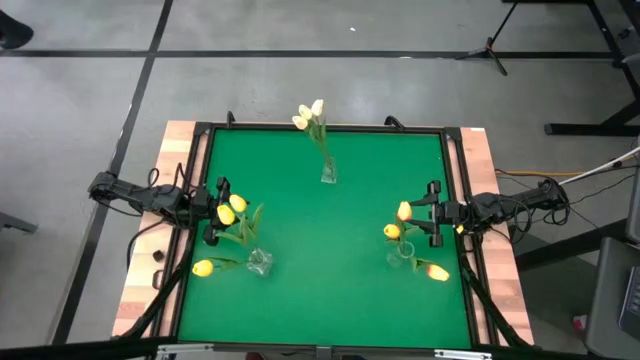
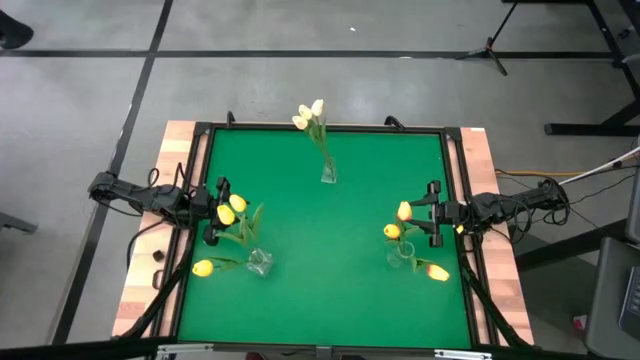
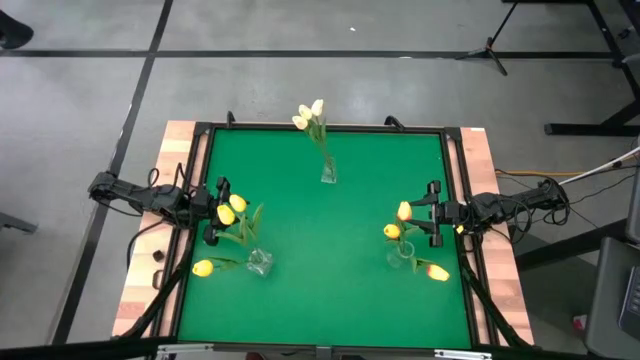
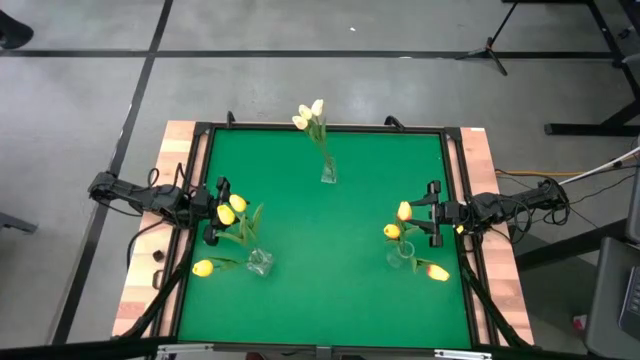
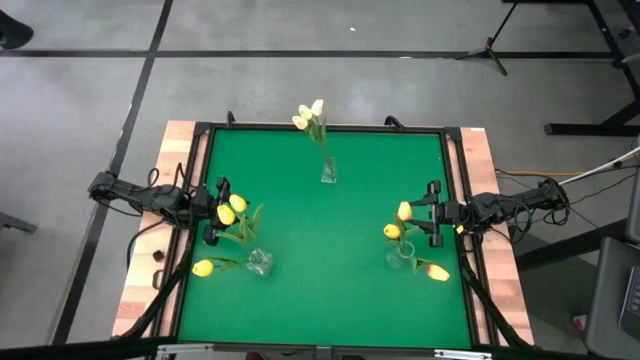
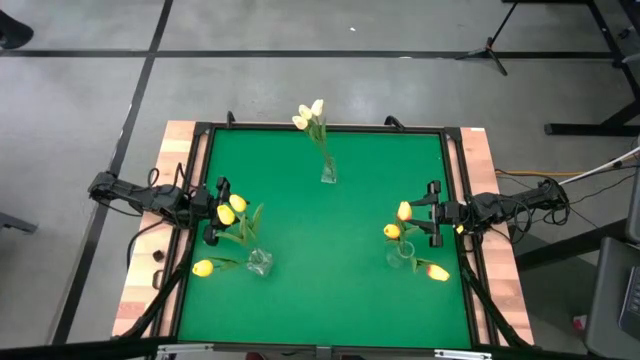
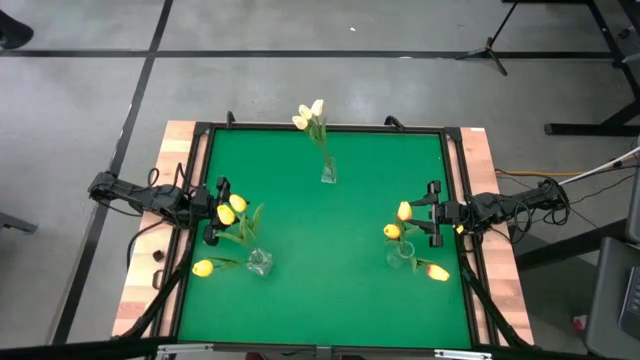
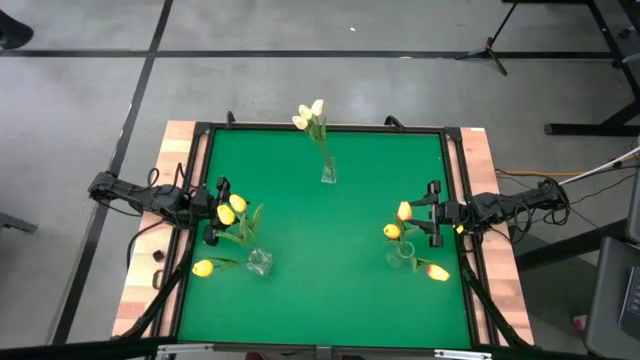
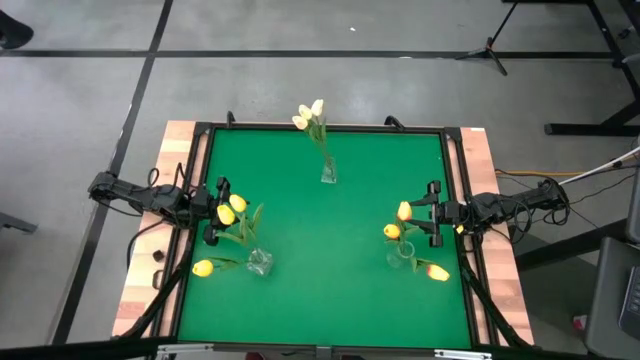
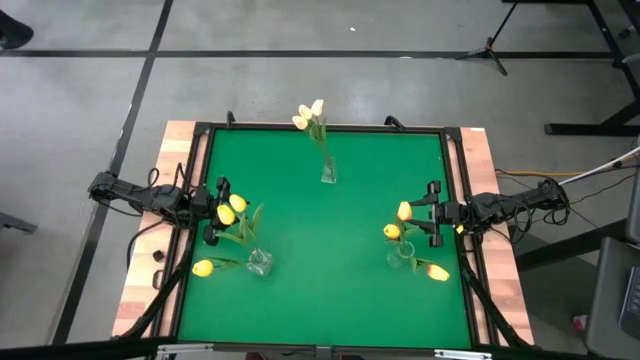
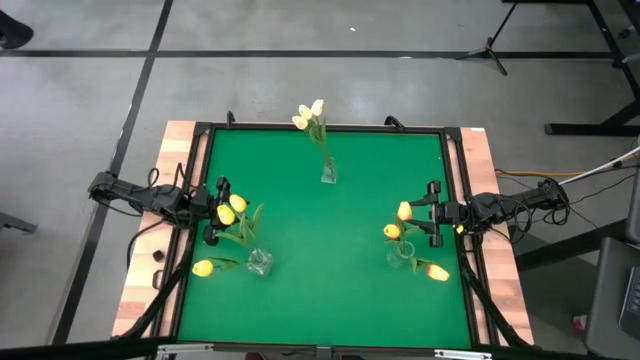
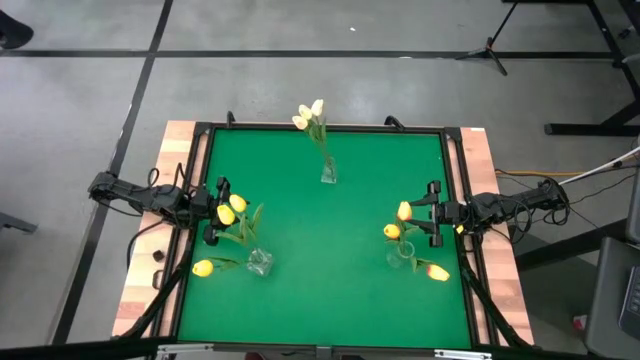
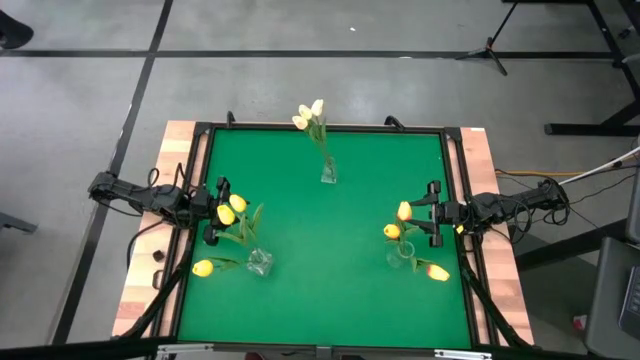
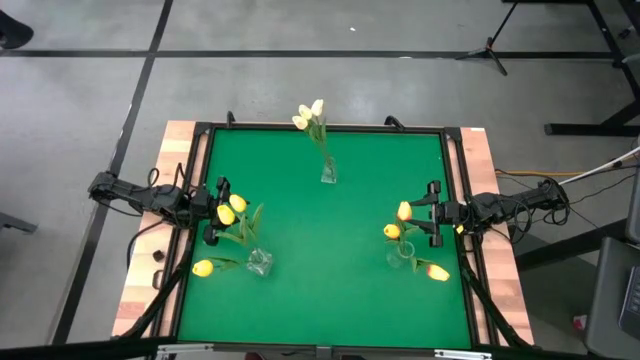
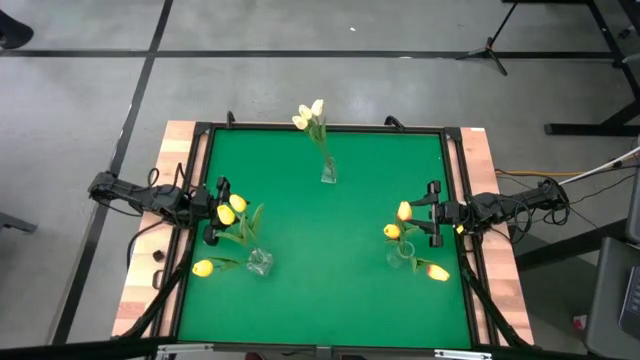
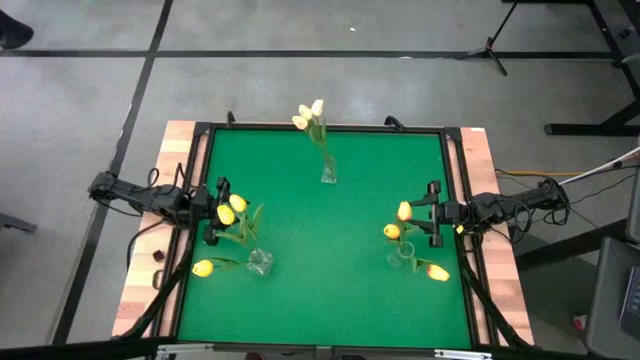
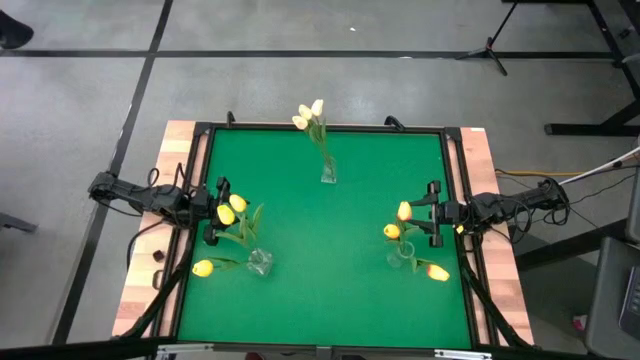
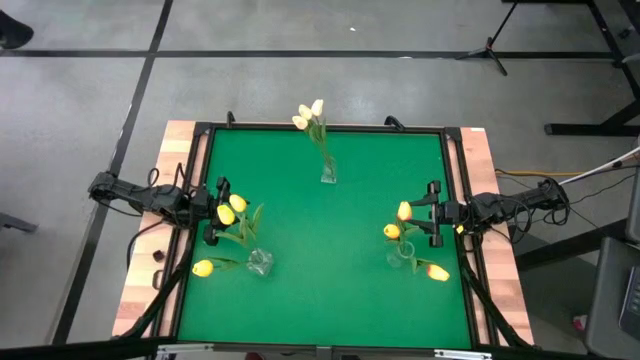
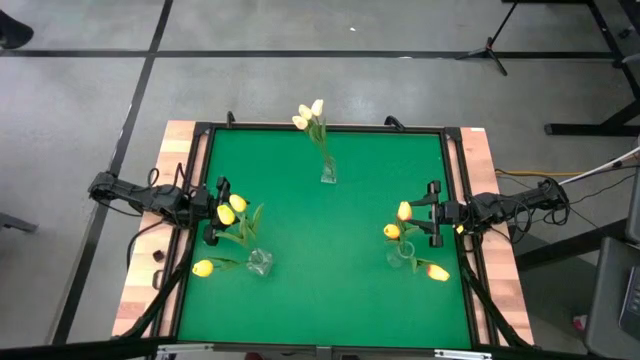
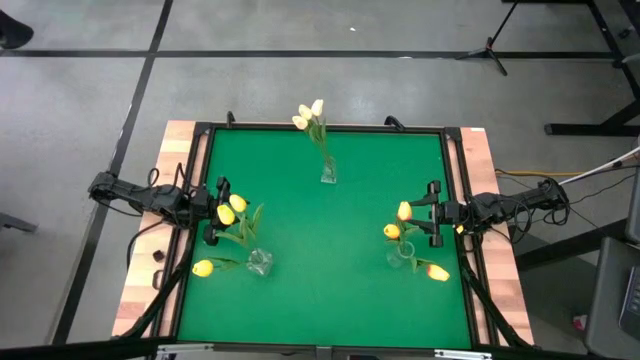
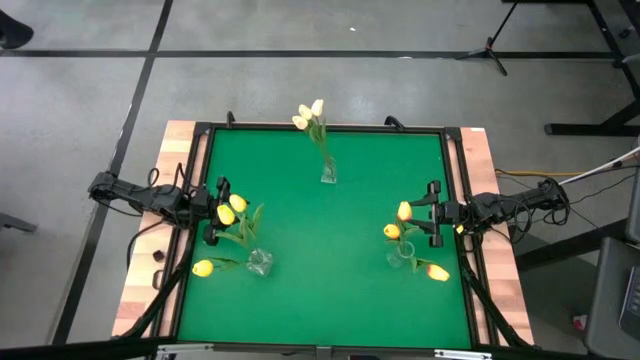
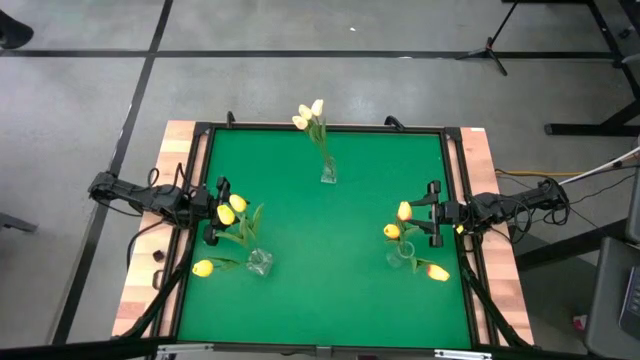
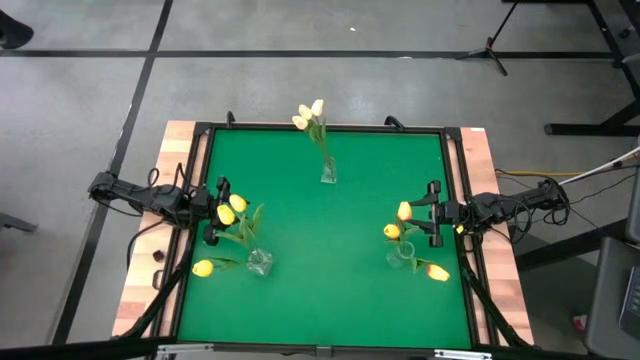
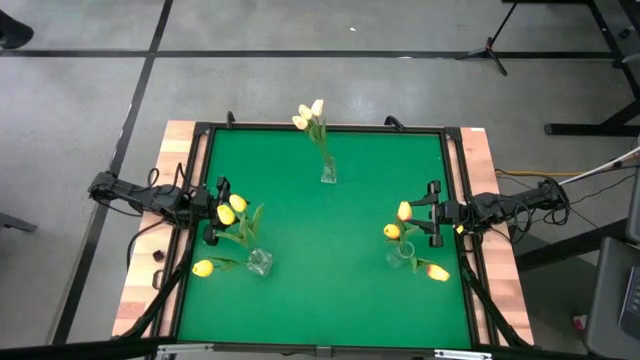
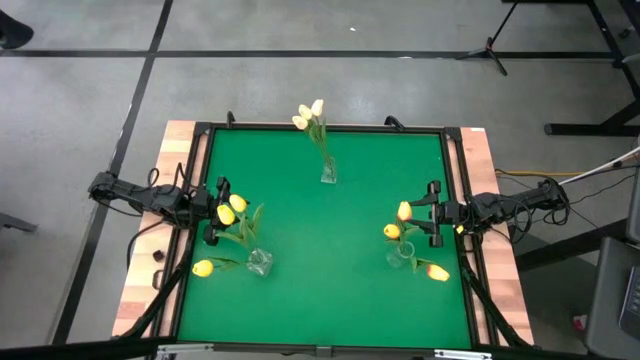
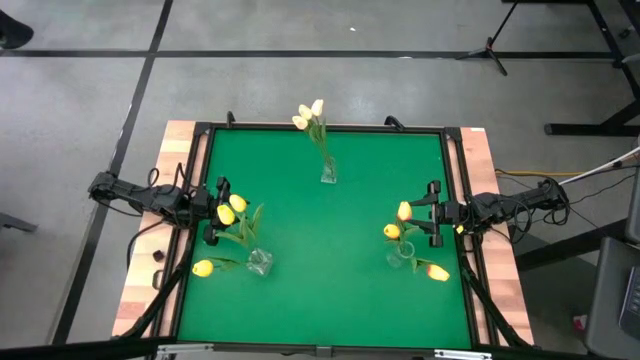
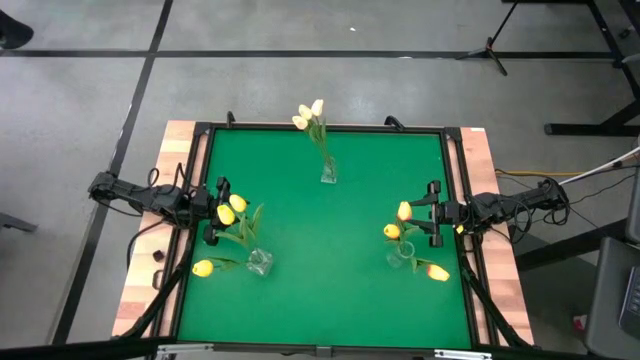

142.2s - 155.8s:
Task: Sort flowers into vase by color
Return to Home Position
